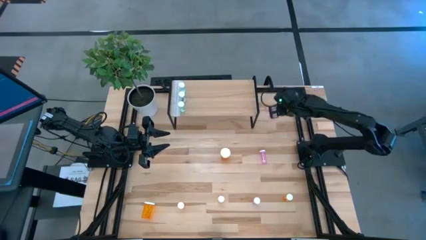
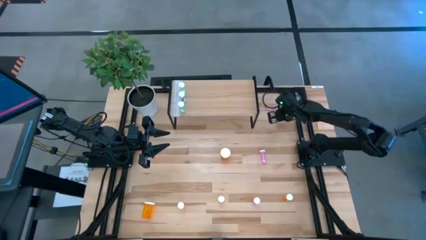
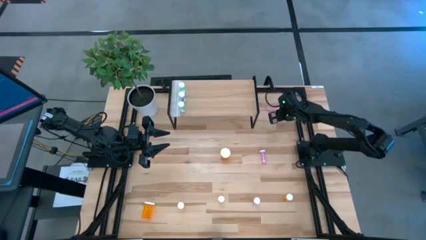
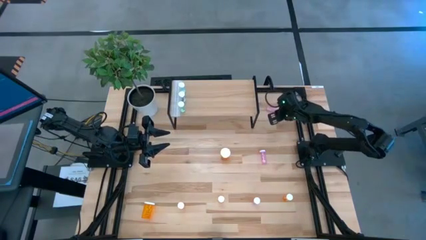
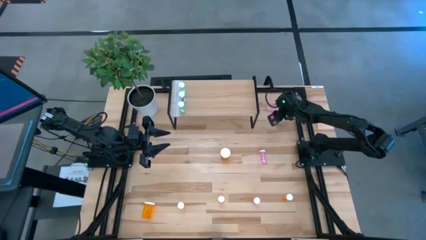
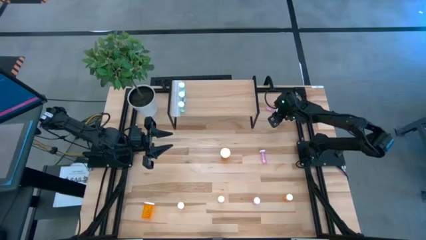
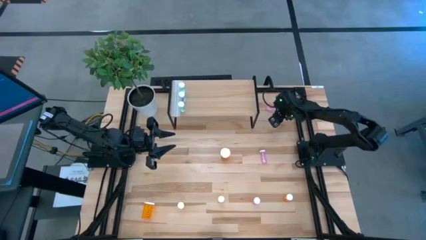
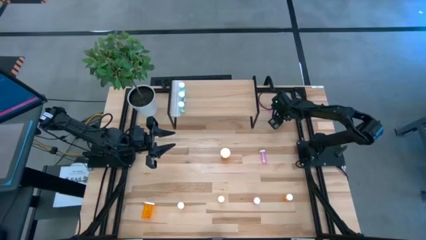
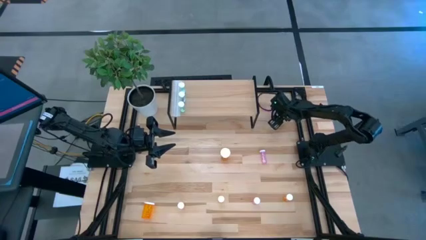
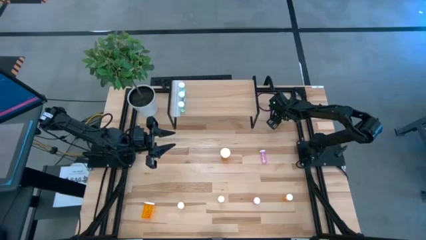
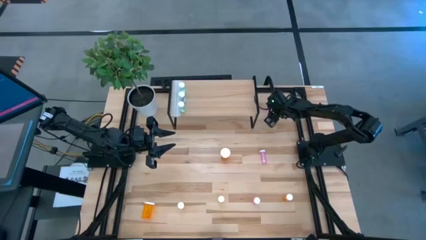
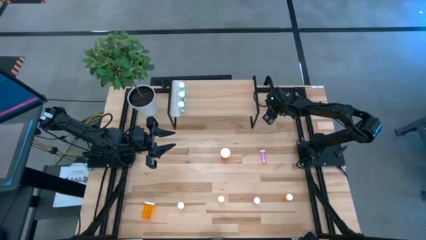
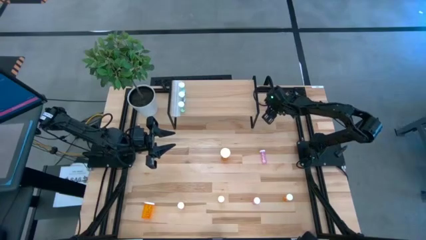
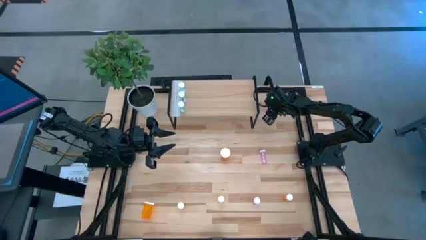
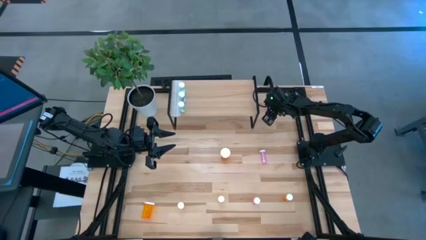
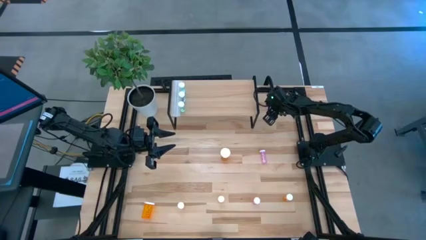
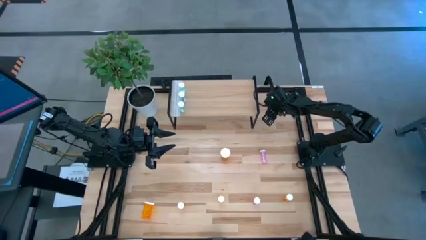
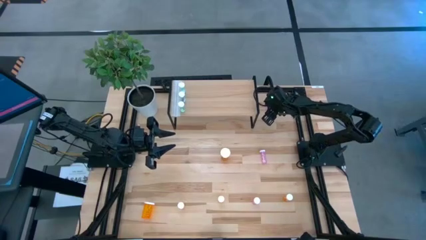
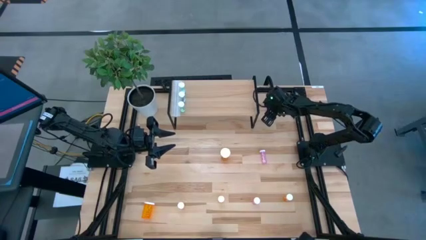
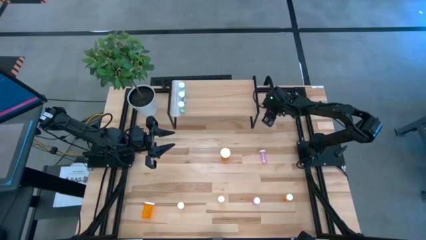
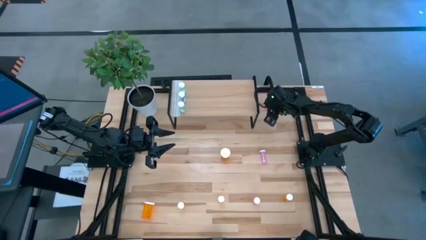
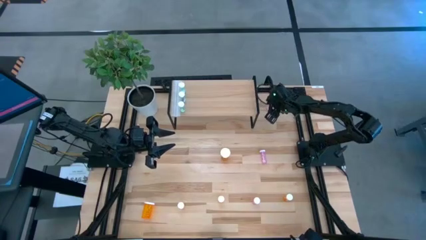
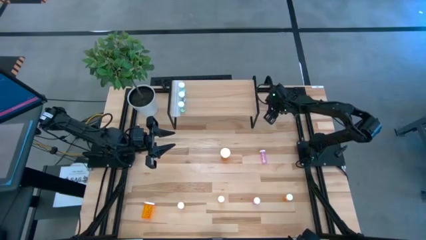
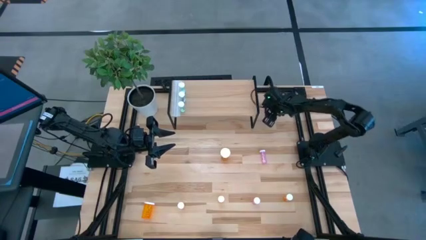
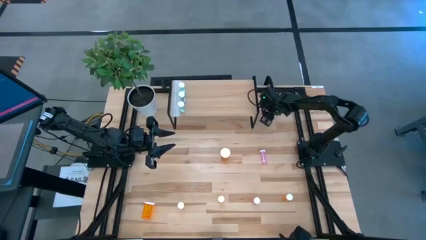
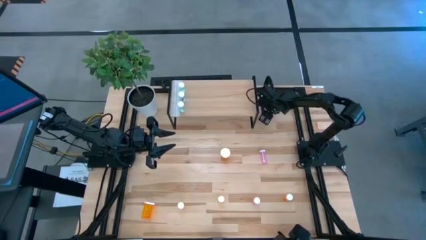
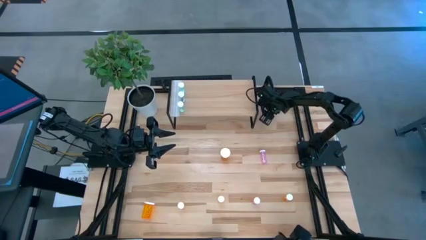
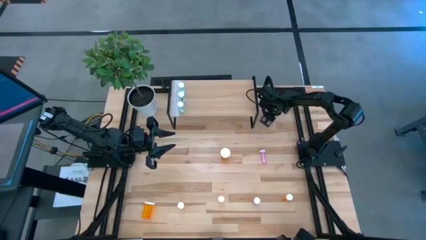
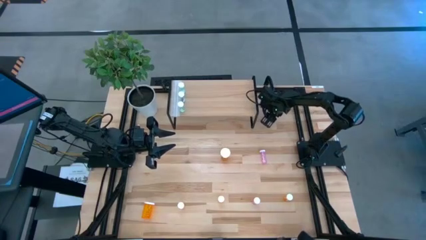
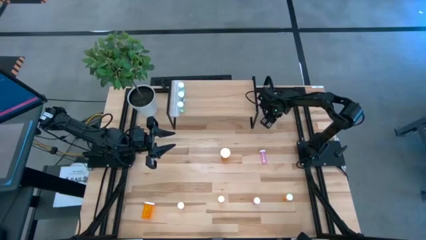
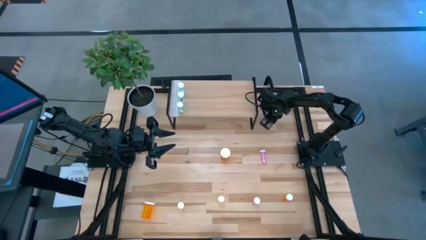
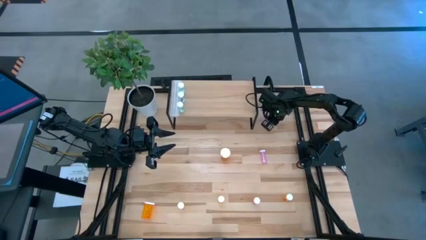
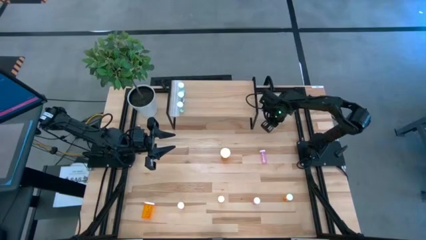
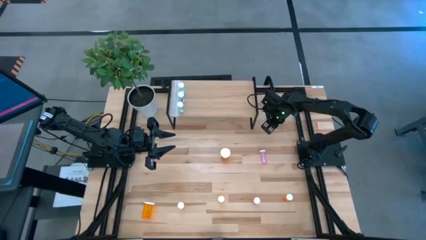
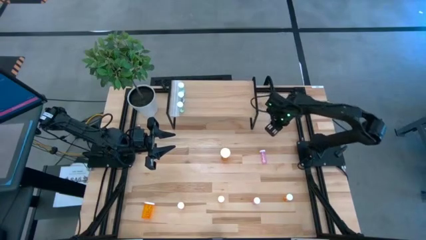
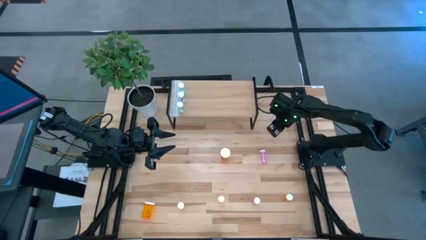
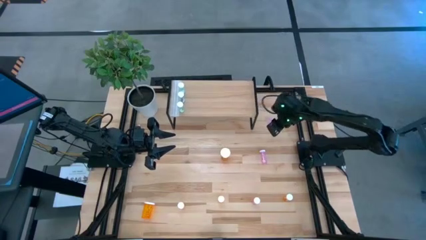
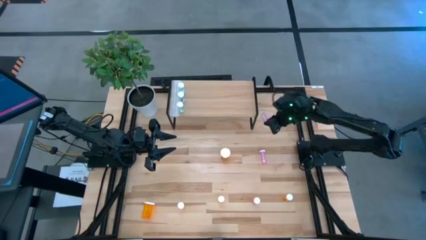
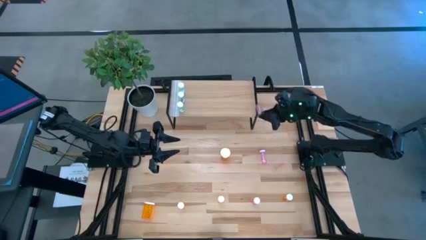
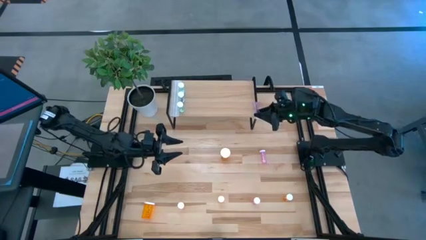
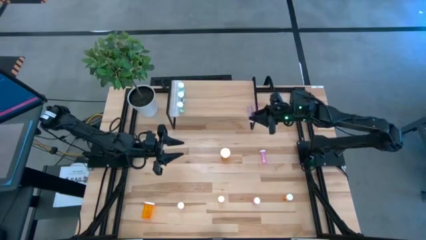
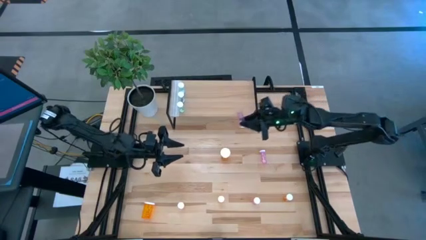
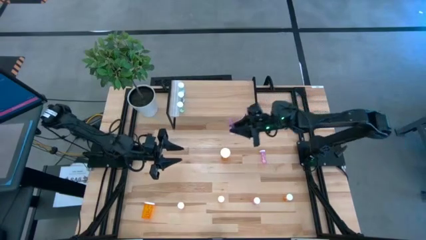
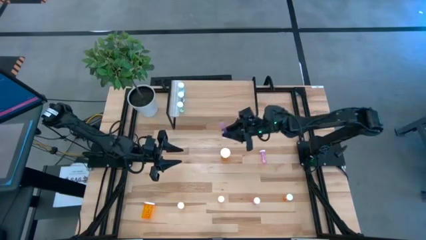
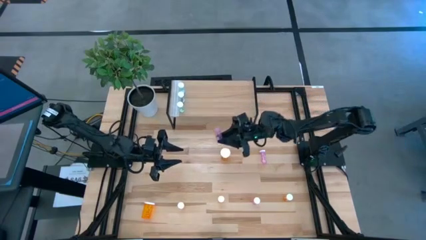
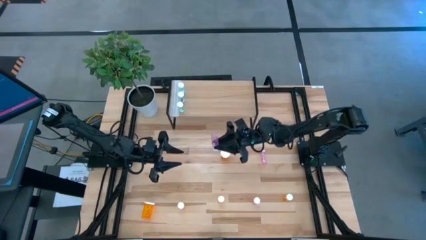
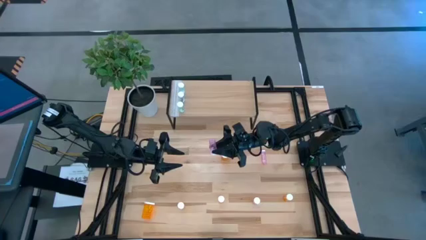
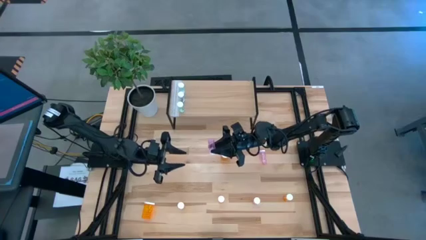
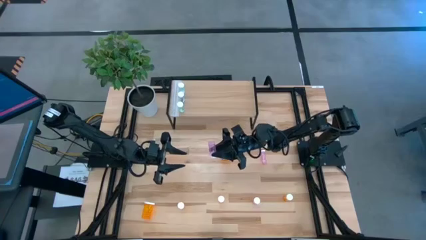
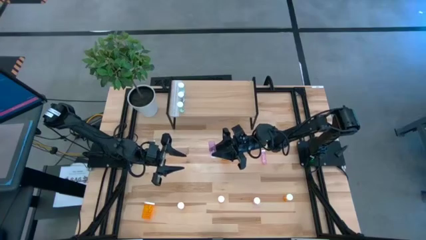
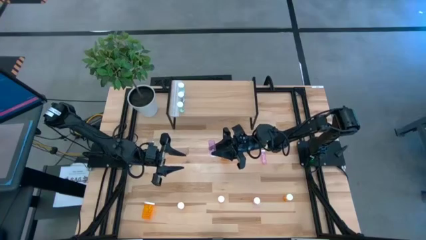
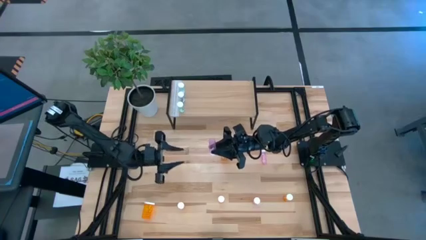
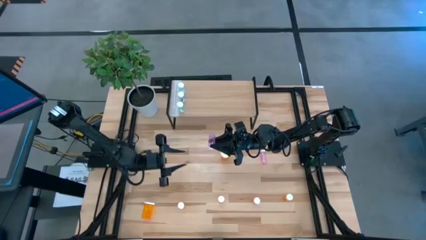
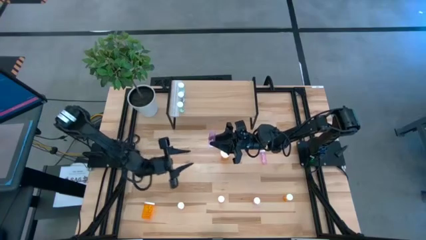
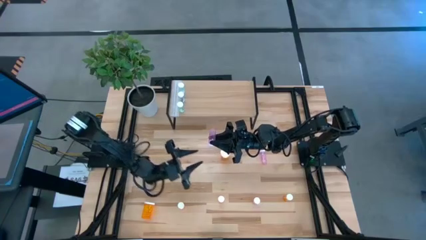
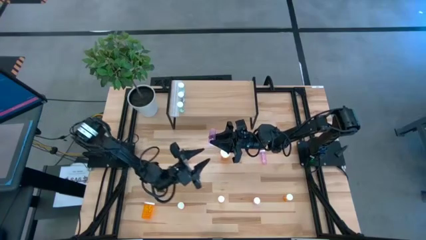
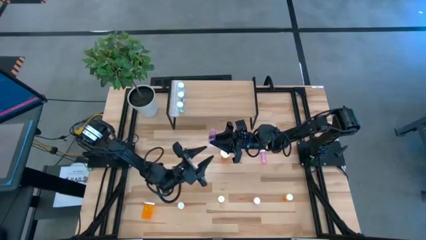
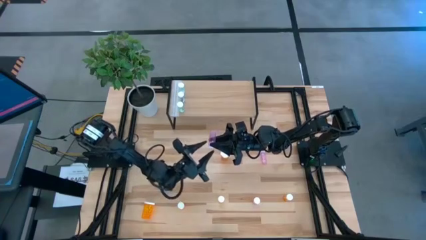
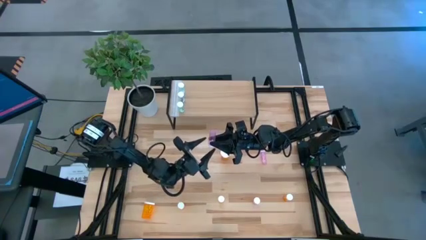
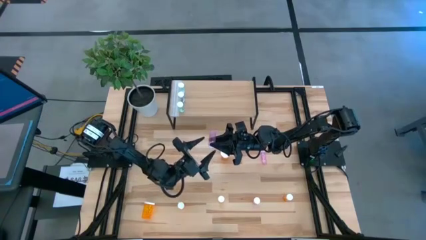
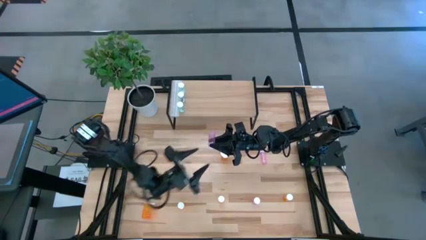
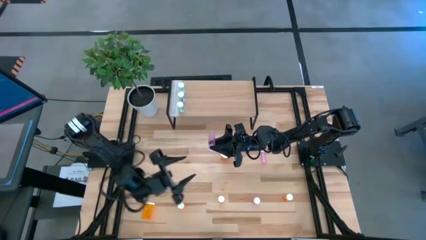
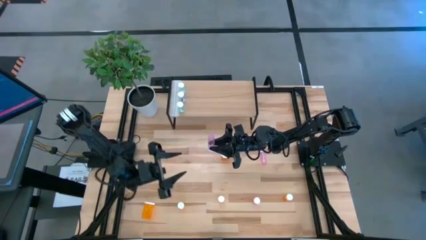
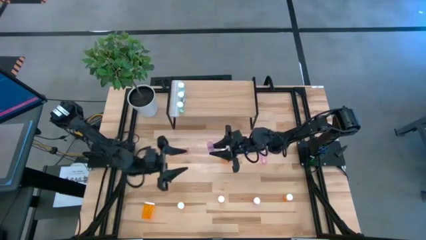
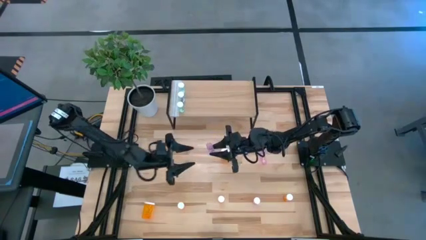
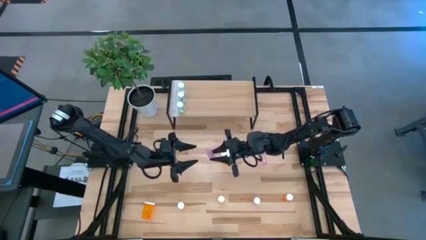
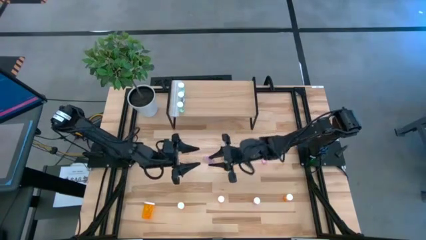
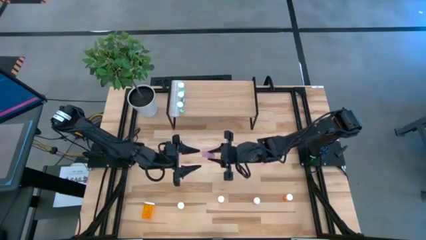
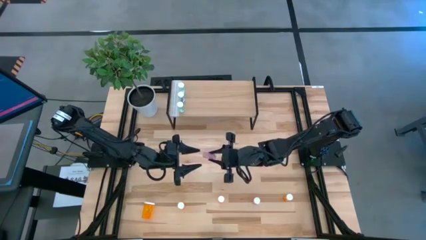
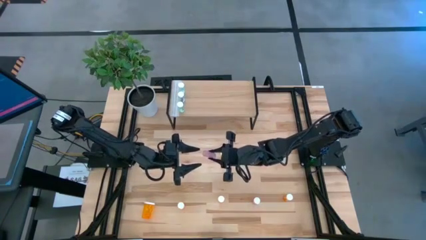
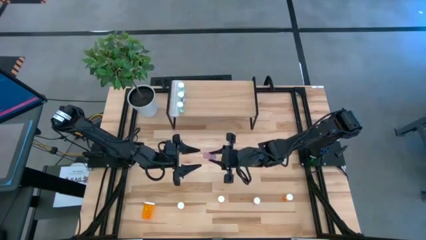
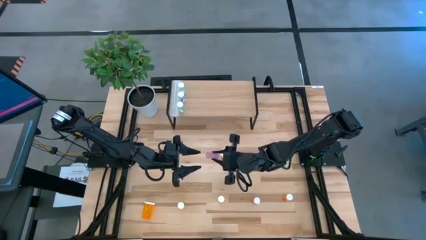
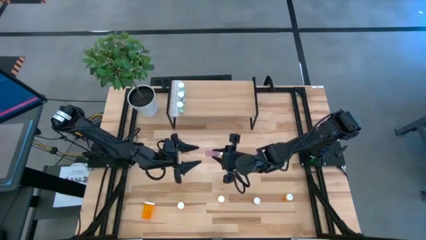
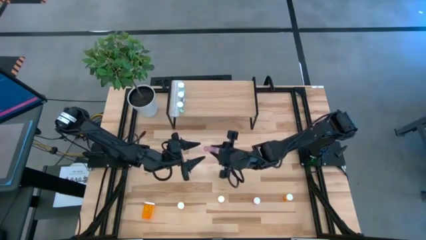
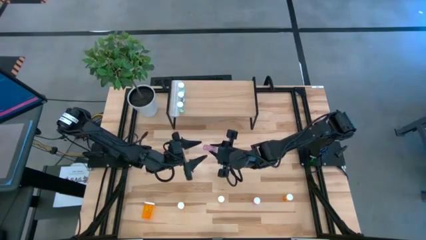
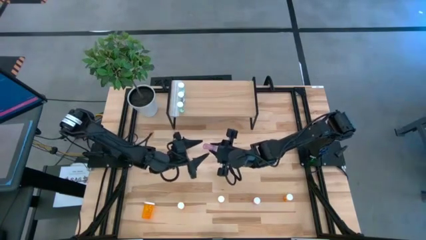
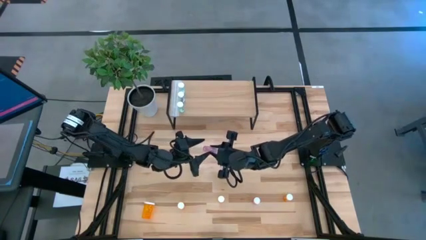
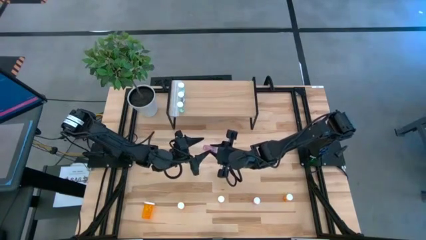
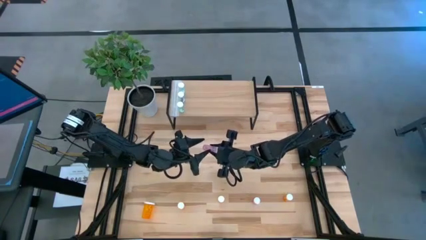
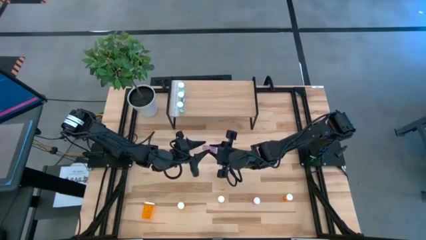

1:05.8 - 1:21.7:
Task: Pick and place medicine bottles onto shelf by color
Put the top pink pill bottle on the shelf
